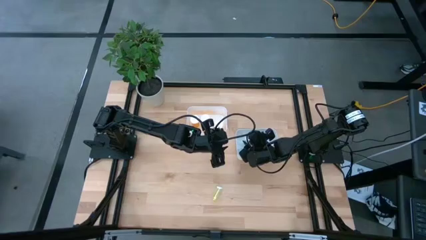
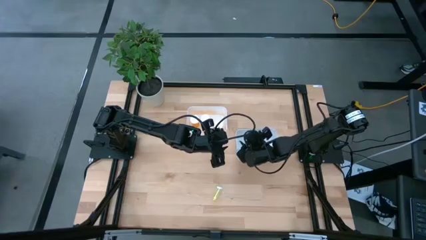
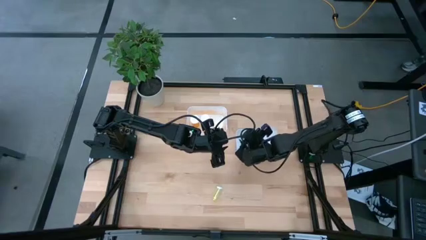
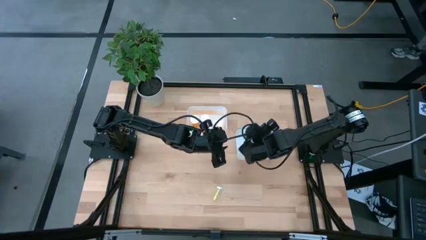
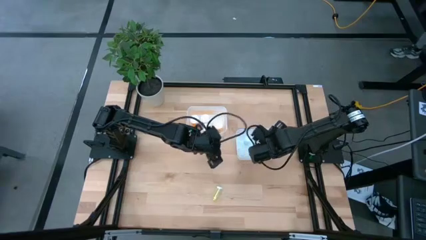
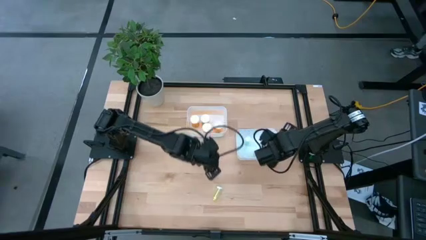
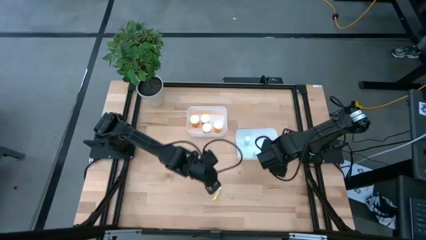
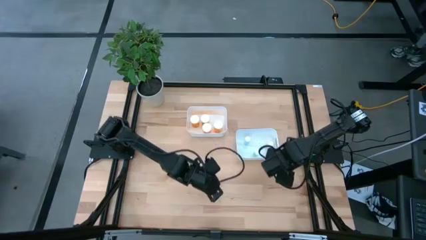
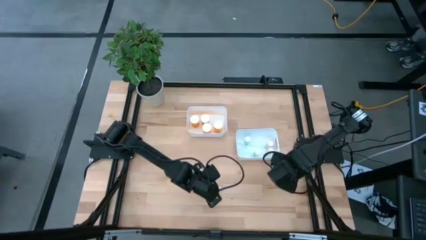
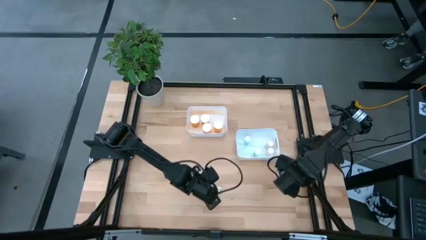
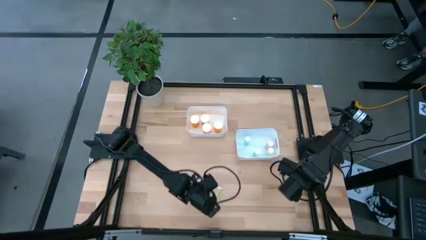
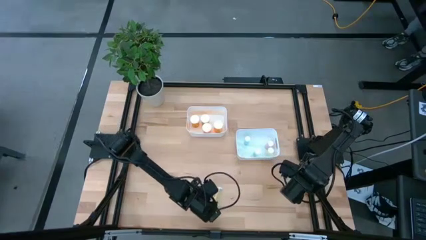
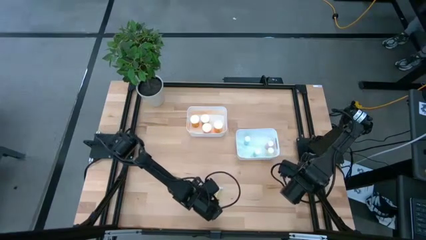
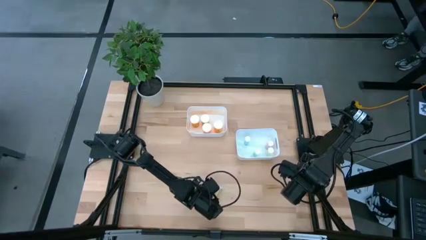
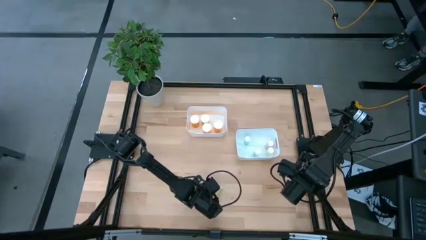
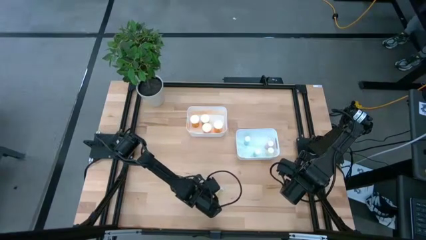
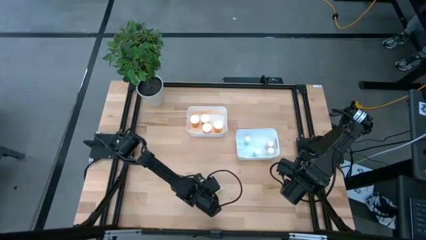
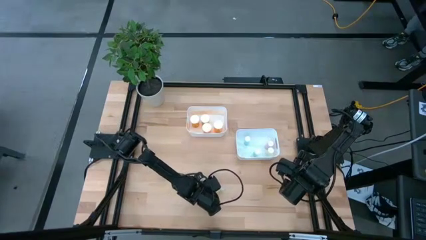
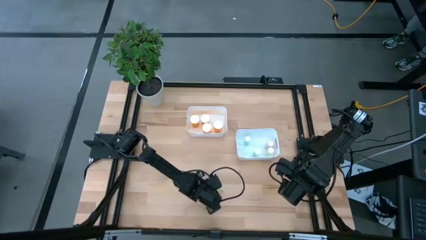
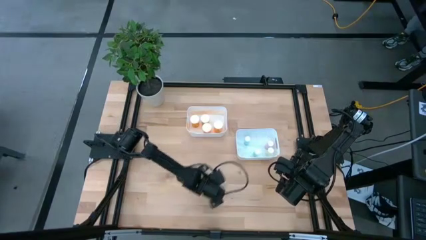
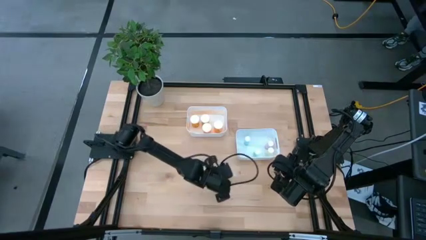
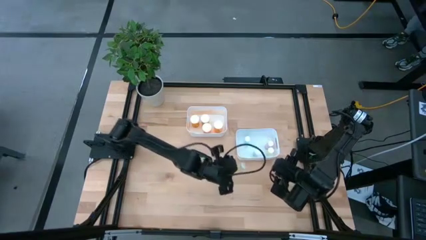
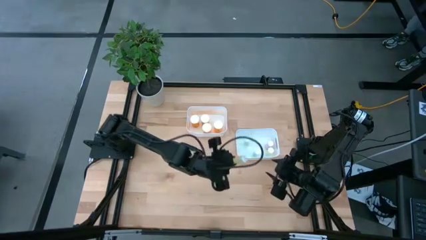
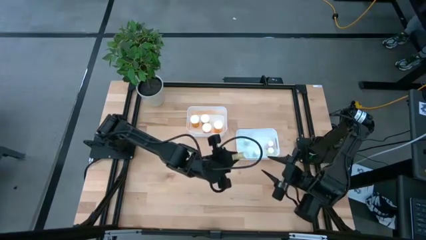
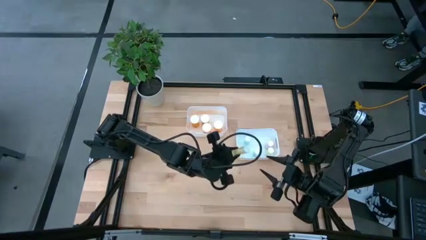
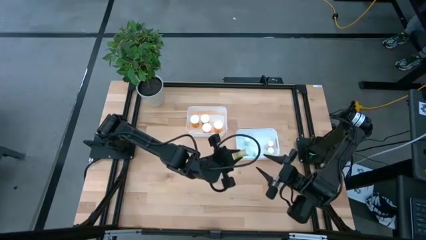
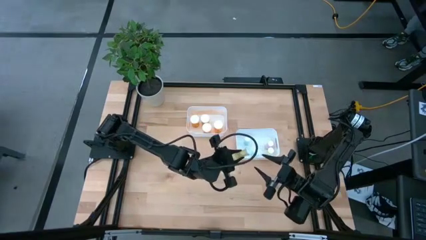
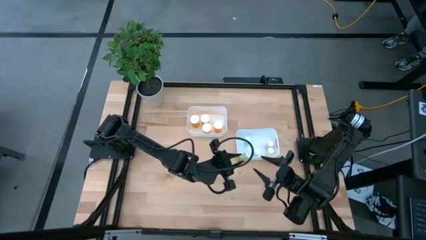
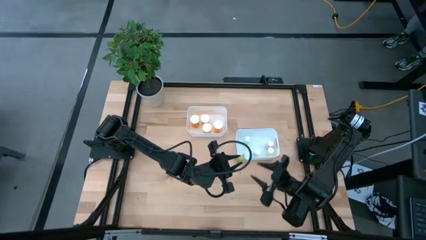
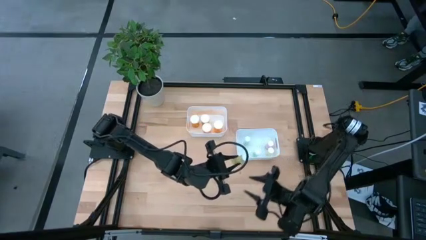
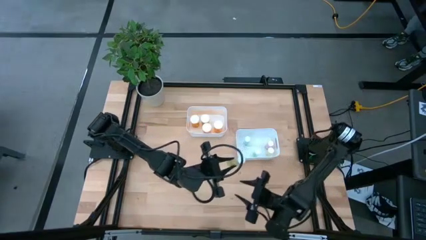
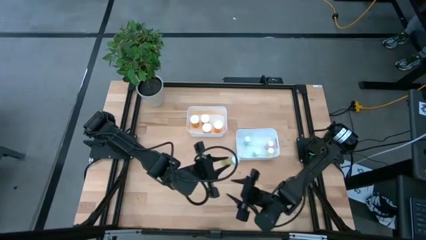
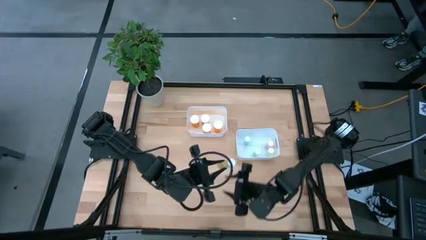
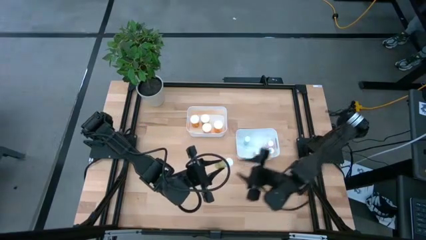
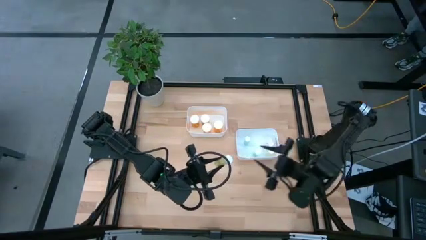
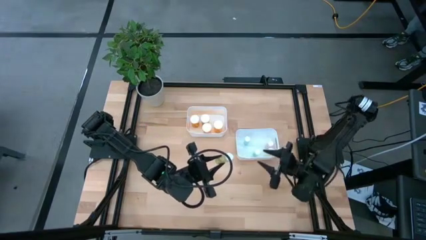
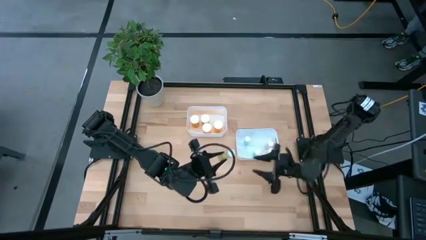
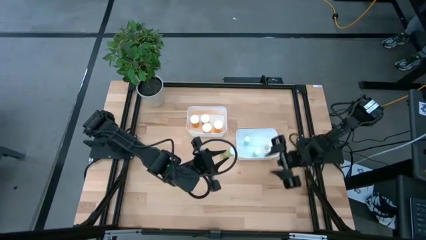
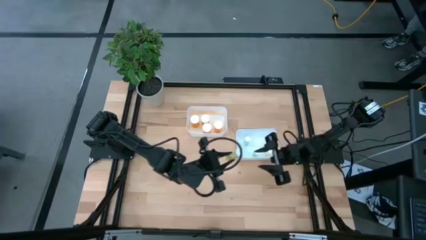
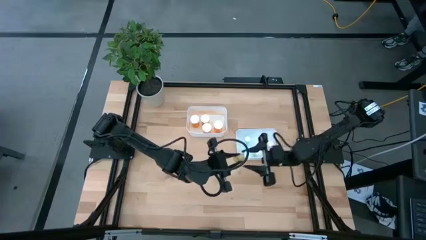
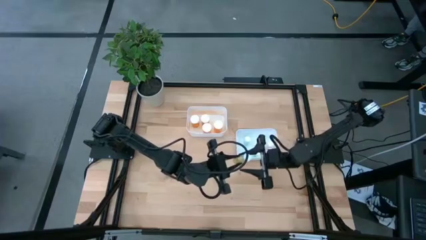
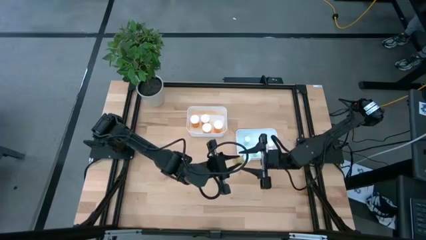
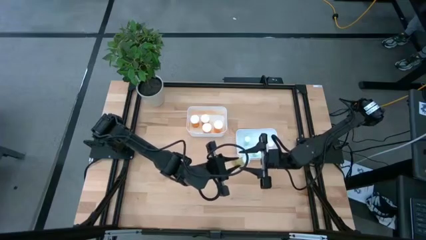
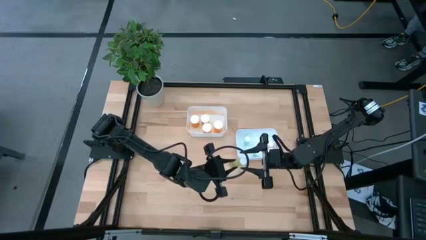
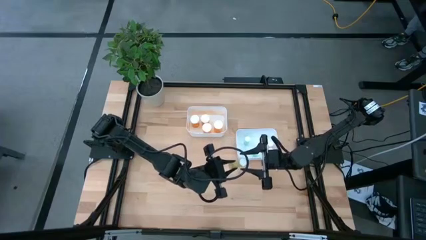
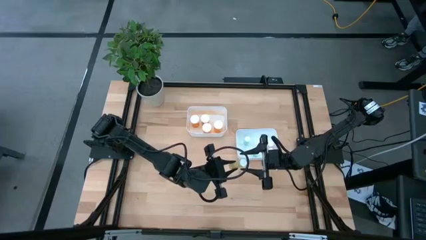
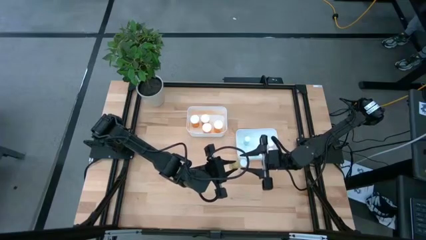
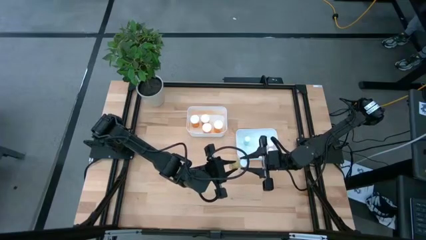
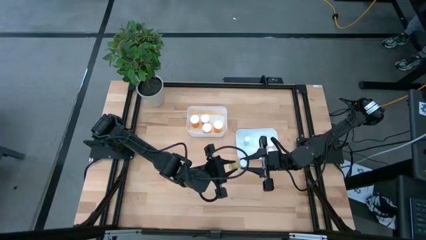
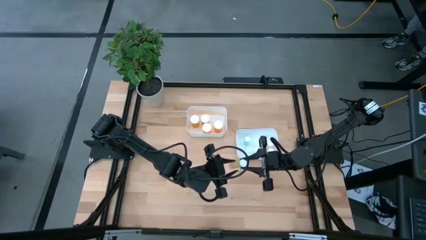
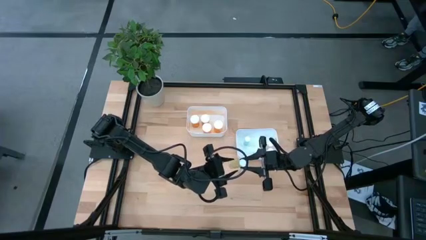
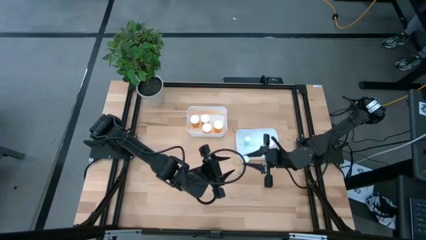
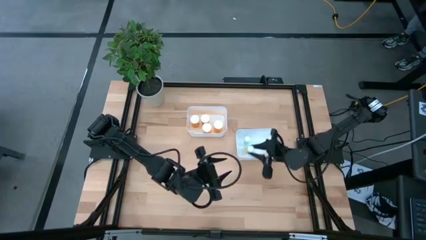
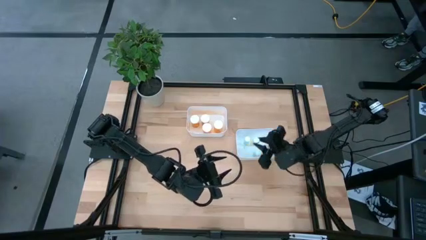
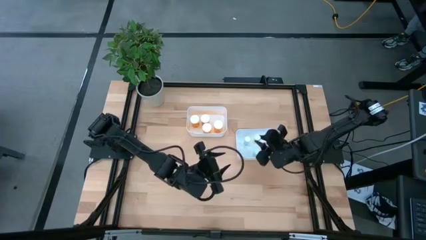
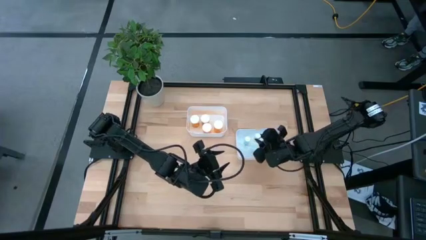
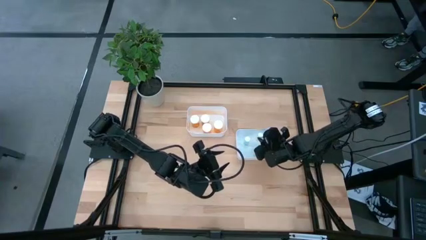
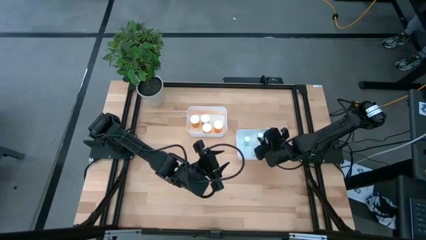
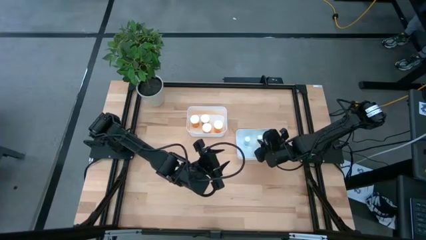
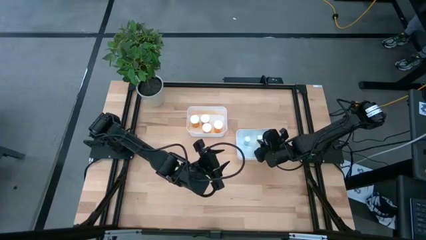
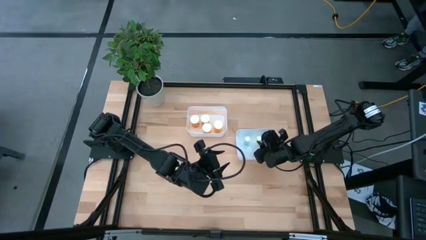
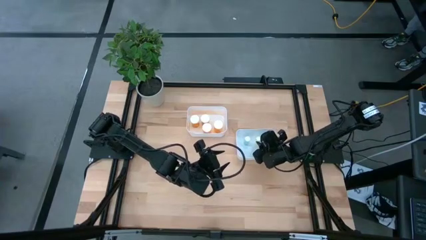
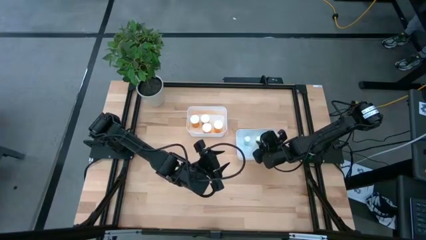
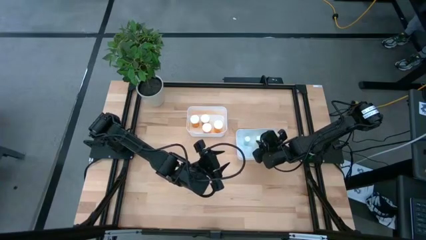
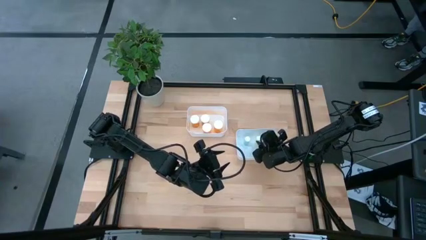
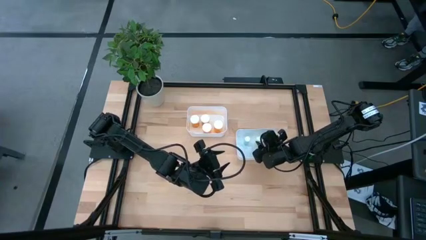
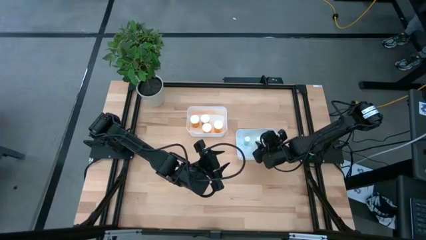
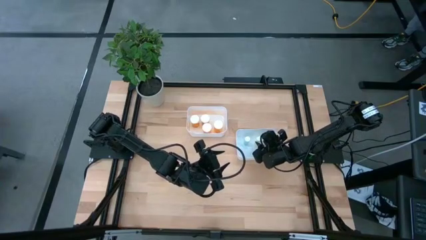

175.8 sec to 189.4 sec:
Task: Pick and place medicine bottles into bin by pill shape (circle, oval)
Put the small yellow pill bottle into the bottom white bin

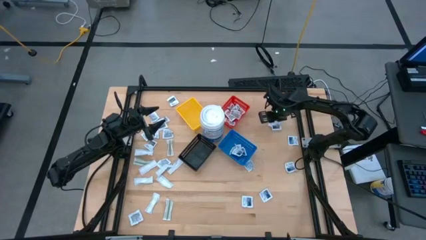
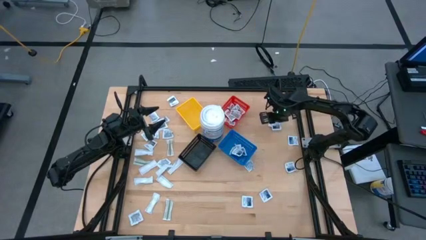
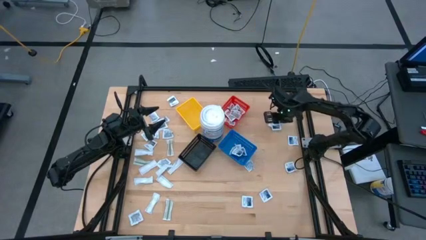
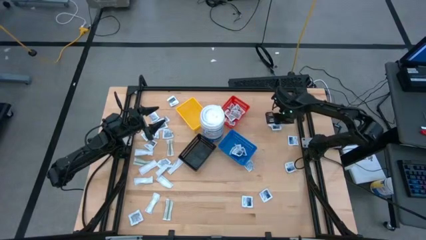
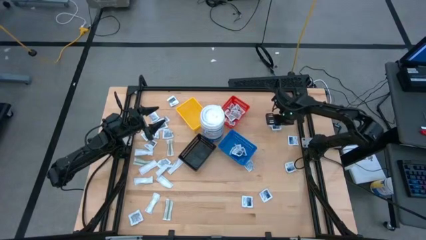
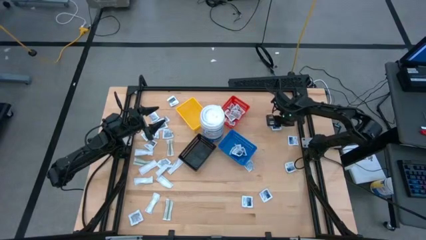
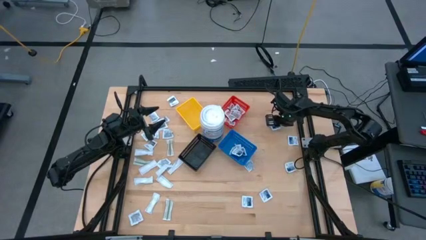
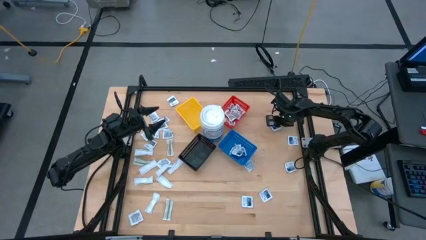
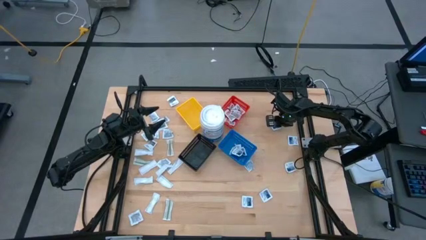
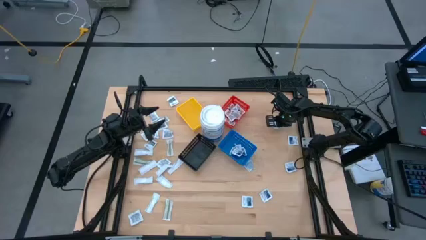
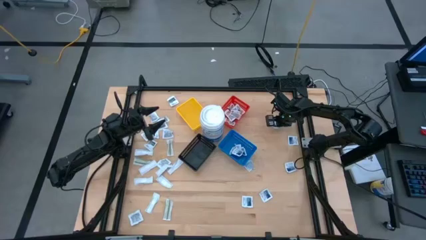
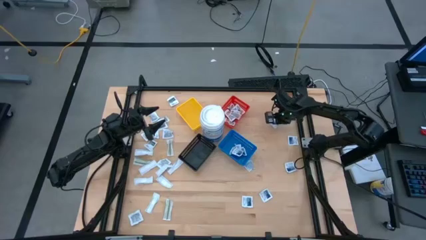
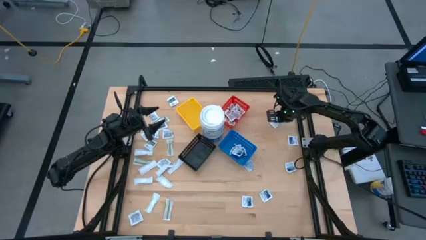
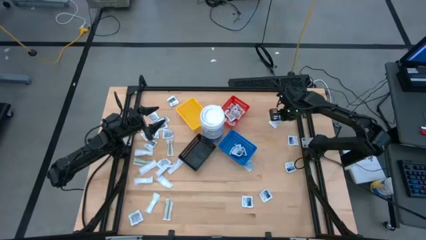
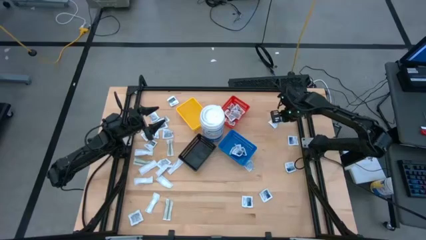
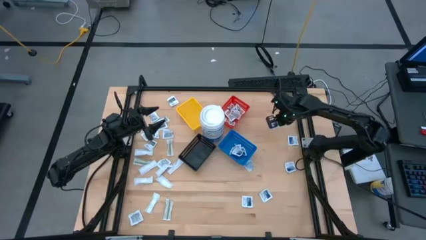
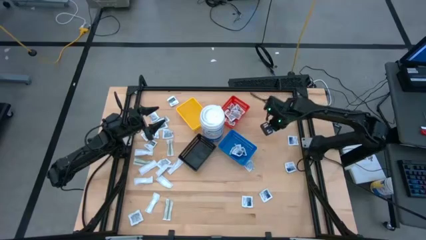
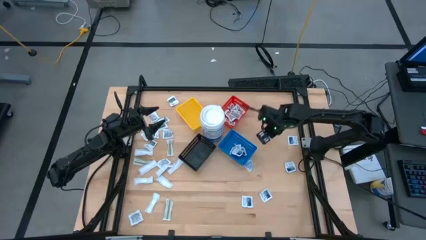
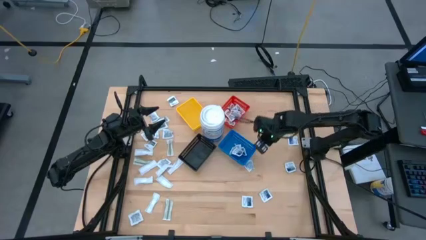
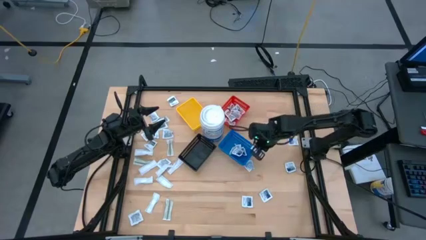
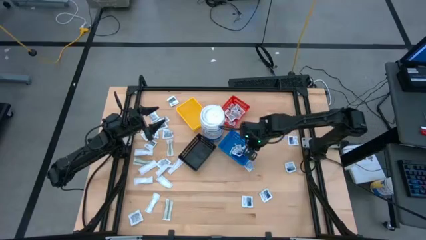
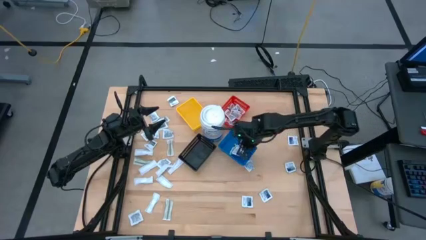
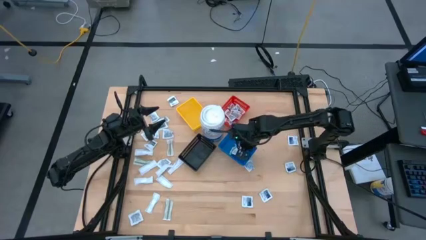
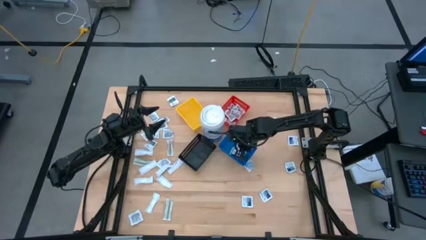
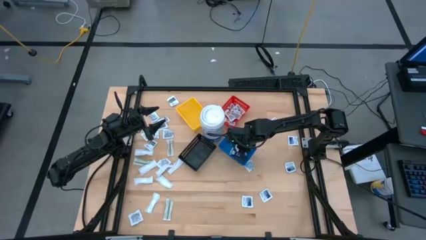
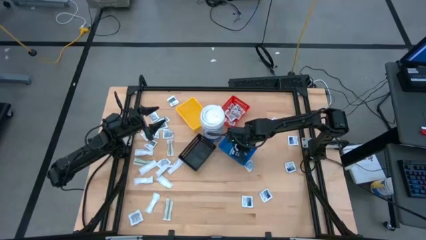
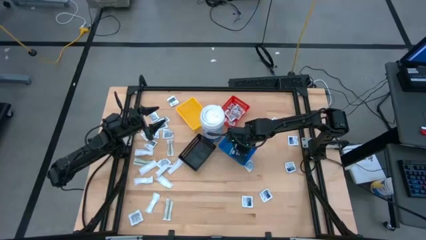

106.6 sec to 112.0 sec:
Task: Pick & Place First Aid Supplies
Put the alcohol pad into the blue bin
